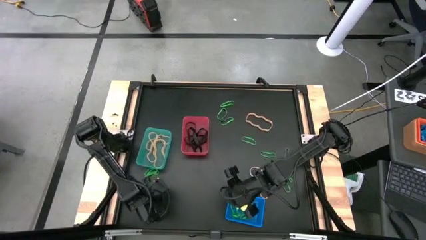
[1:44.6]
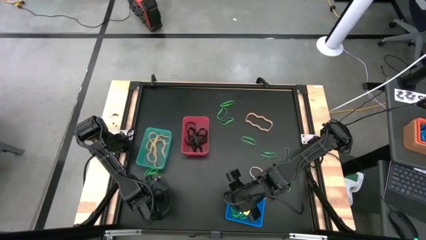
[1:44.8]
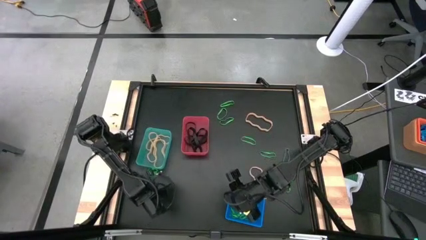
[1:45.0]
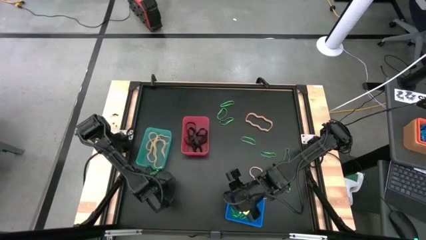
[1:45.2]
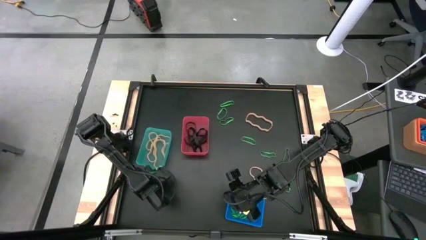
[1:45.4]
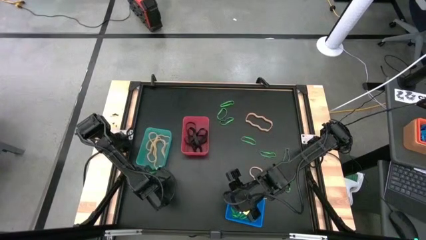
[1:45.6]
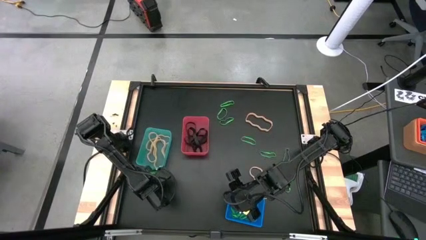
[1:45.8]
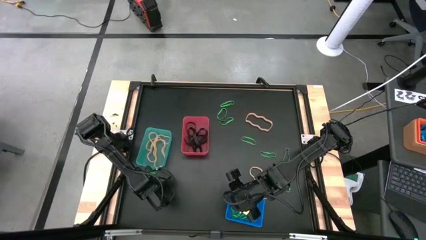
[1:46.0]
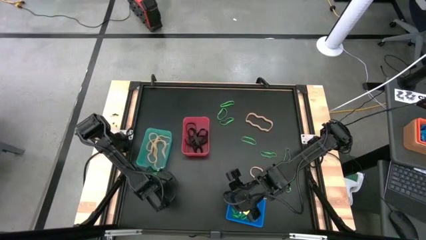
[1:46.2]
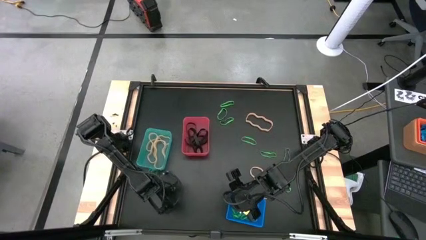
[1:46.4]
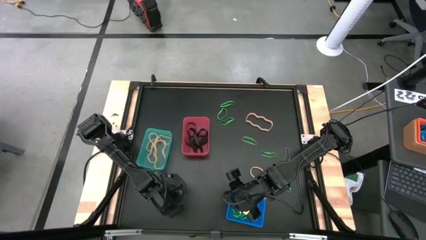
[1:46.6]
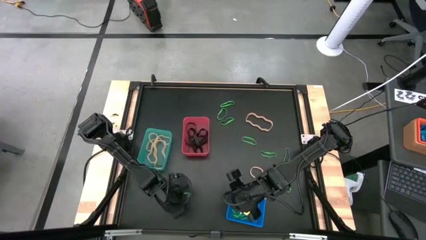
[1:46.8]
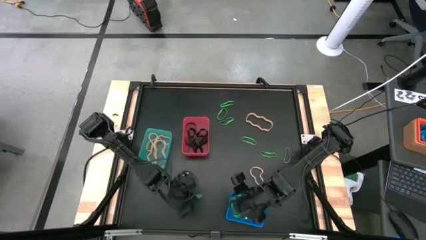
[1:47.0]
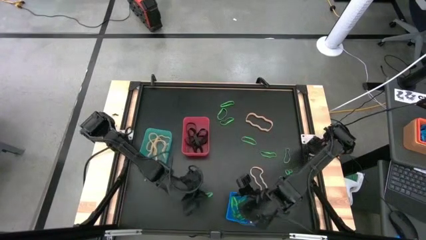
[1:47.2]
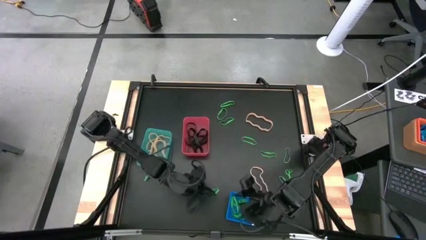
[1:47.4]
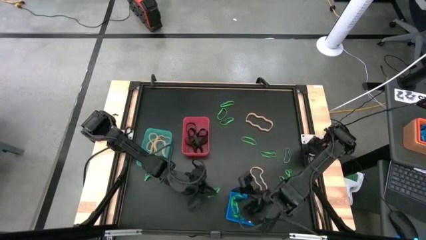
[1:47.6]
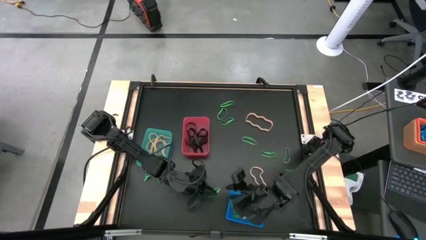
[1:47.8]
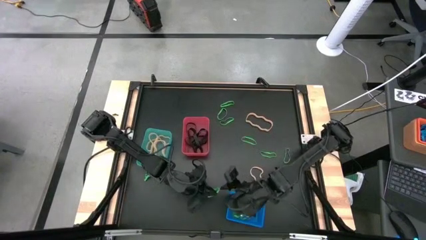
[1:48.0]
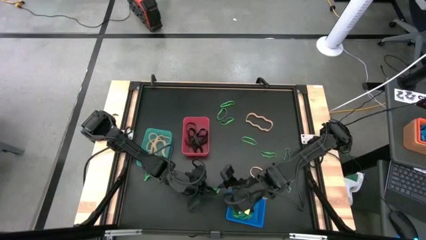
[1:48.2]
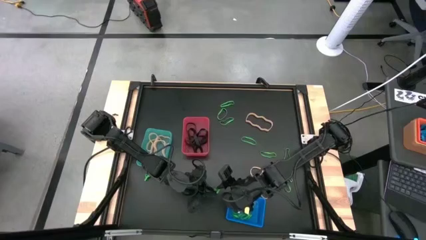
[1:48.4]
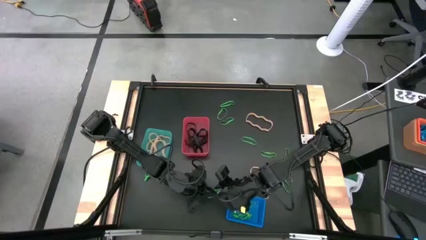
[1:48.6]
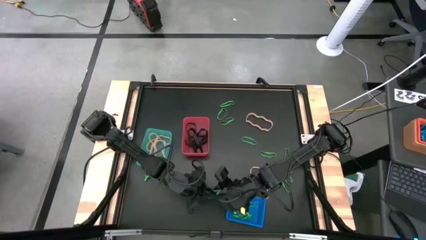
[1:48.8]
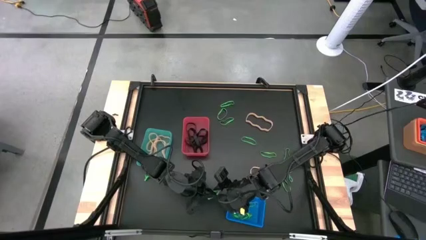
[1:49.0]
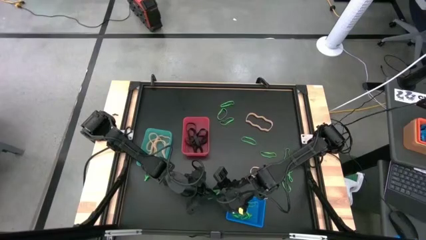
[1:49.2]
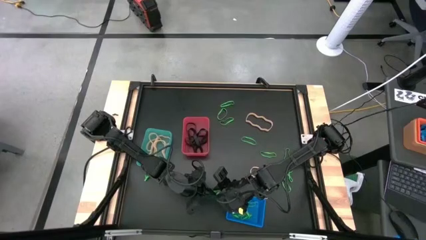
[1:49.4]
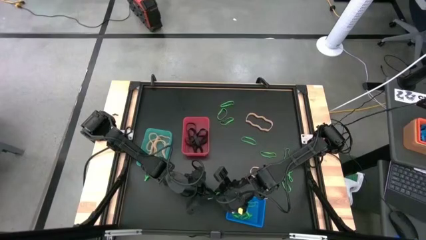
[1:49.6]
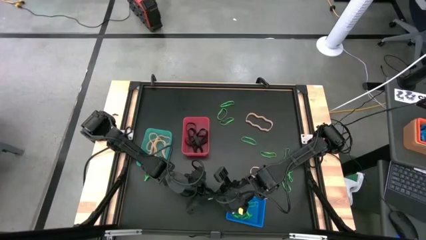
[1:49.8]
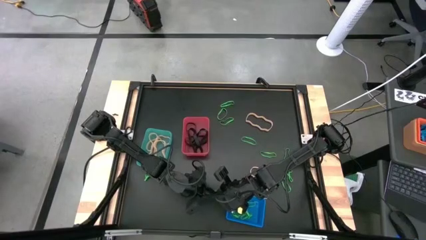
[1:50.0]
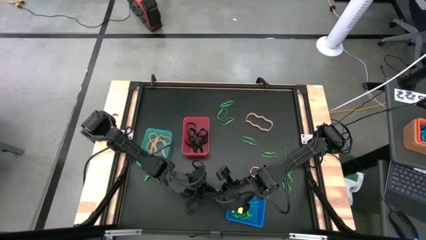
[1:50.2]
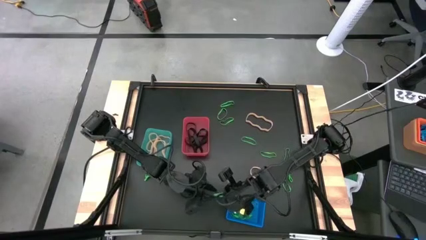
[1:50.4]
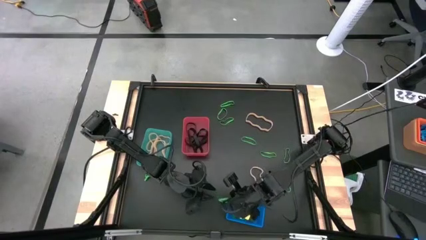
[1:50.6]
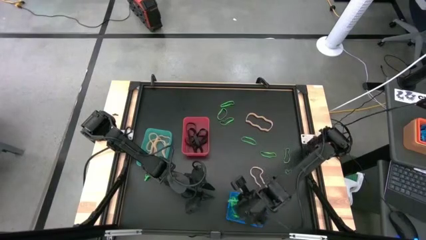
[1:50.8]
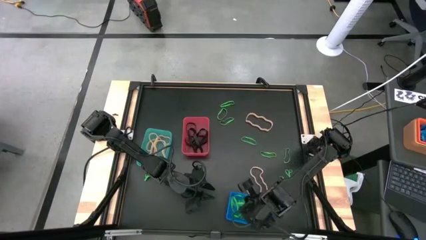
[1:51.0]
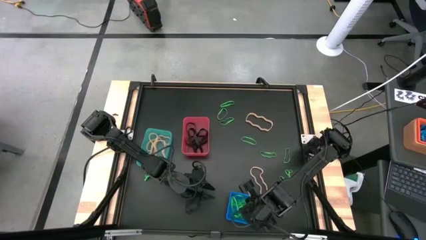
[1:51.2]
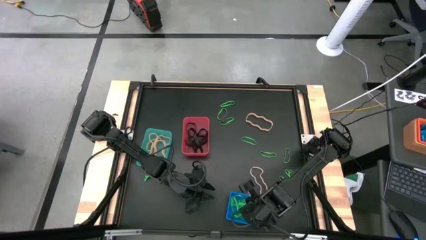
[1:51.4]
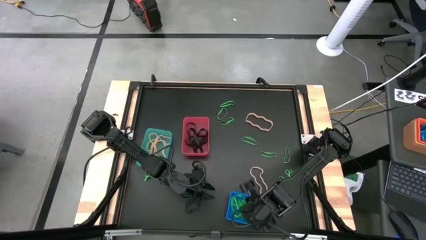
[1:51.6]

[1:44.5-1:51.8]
Task: Sort rubber bands into baskets
Put the green rubber band into the blue bin

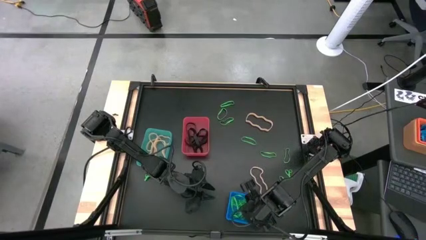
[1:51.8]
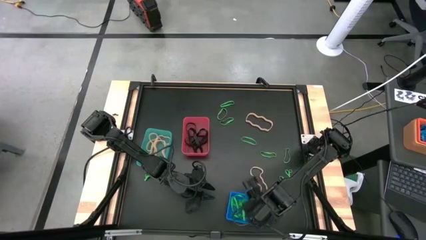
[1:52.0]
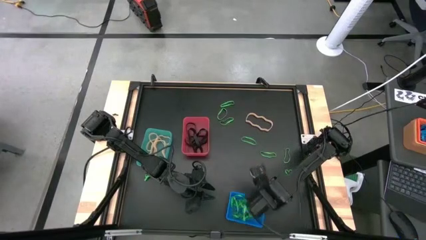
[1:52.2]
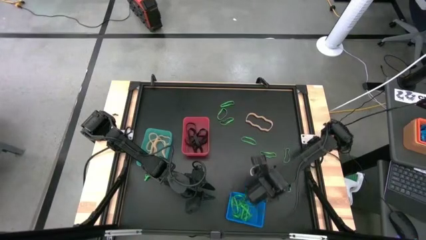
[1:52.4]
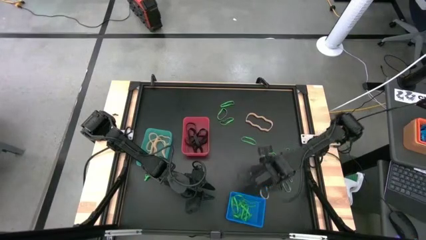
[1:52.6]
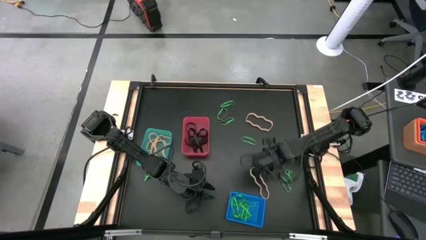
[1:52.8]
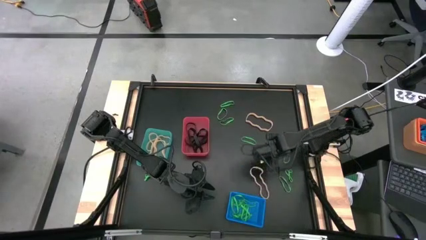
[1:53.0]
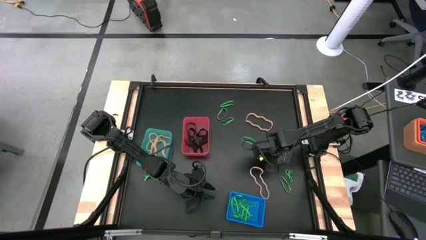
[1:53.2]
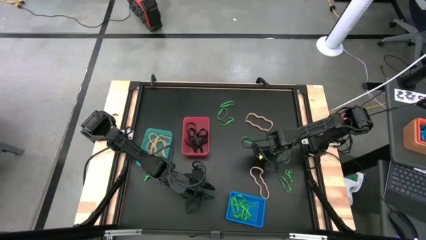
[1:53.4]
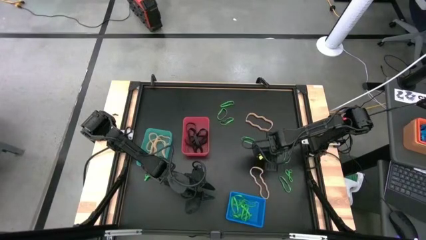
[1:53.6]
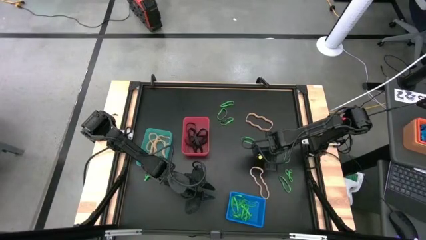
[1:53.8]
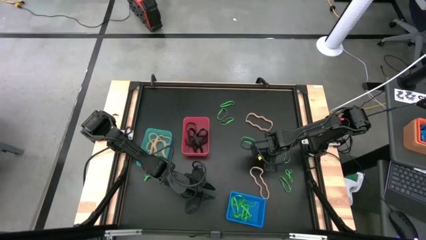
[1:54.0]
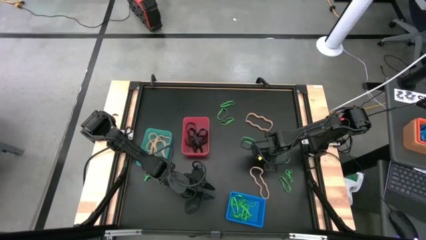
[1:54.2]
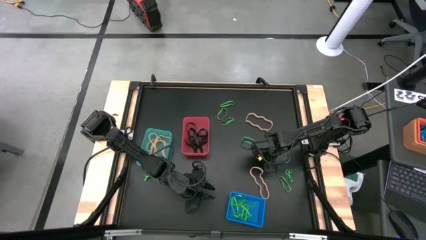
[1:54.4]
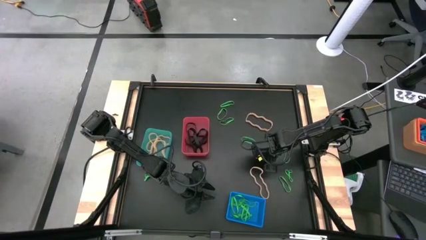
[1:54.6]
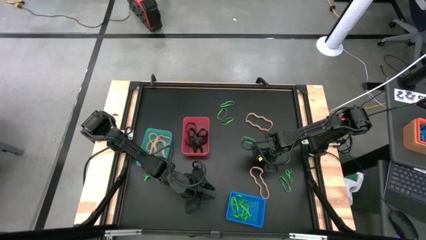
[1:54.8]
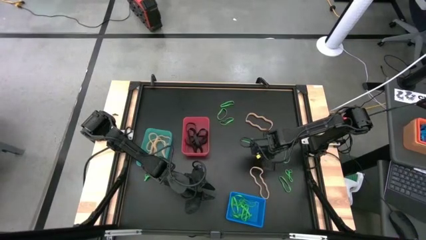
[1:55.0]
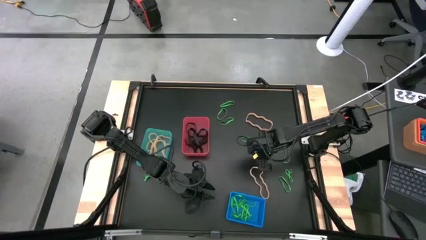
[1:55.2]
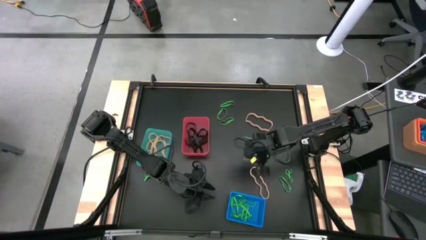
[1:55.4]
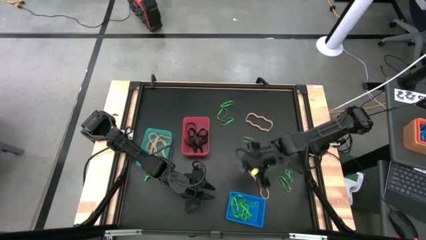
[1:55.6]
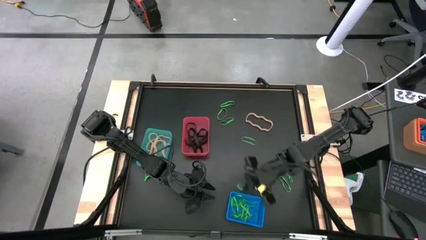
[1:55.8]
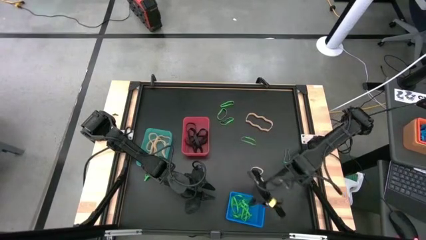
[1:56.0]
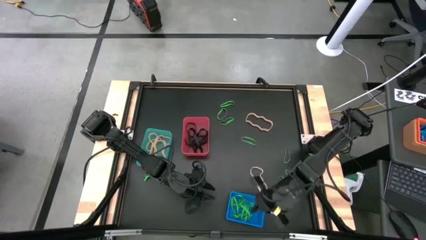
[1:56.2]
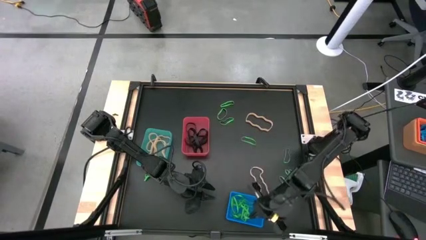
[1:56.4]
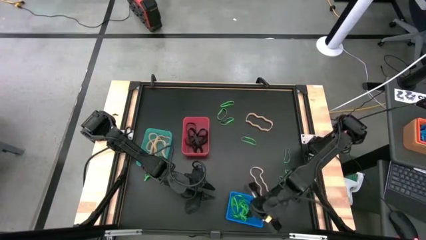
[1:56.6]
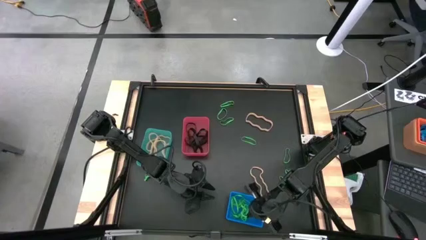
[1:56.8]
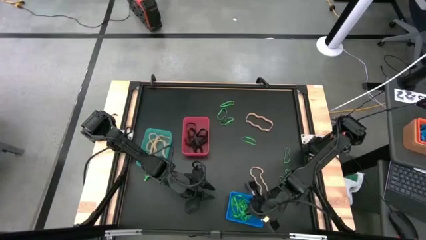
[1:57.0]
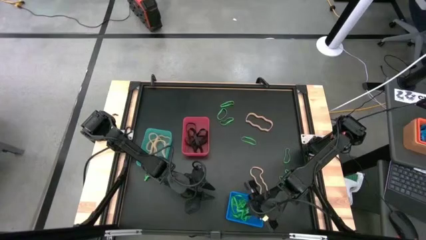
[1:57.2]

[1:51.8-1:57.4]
Put the green rubber band into the blue bin

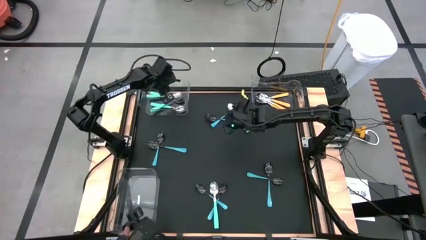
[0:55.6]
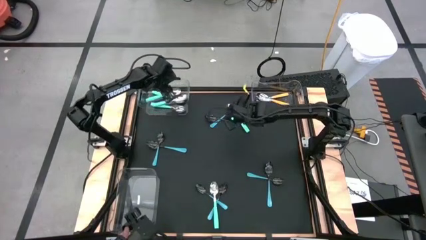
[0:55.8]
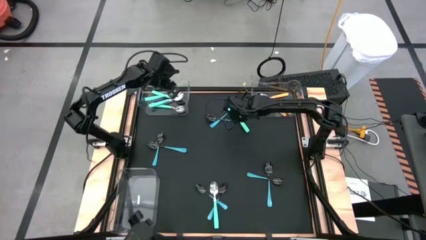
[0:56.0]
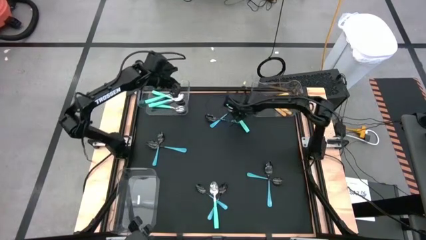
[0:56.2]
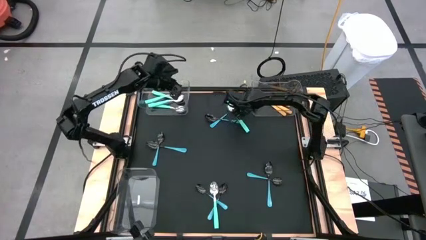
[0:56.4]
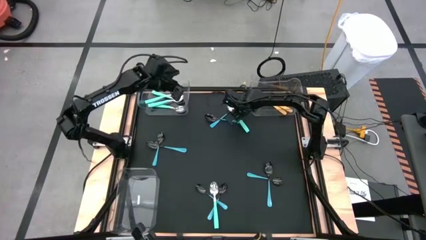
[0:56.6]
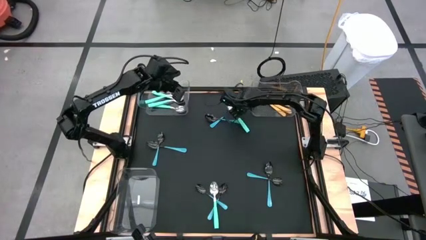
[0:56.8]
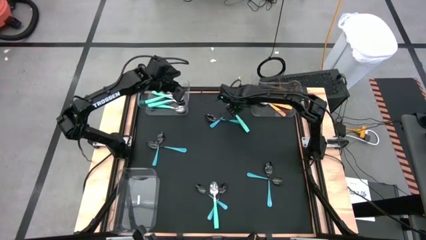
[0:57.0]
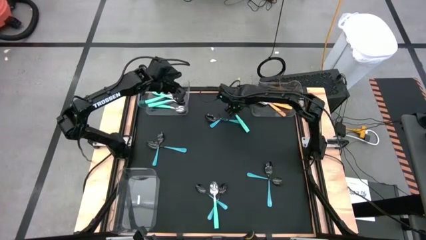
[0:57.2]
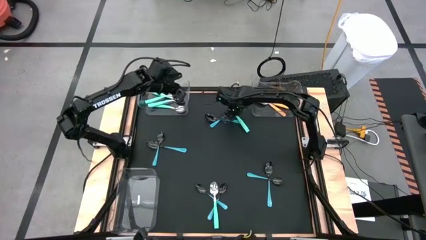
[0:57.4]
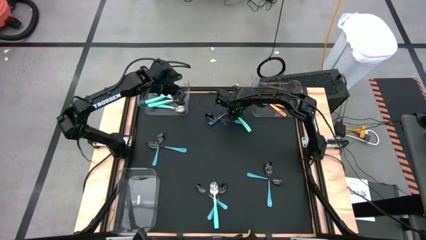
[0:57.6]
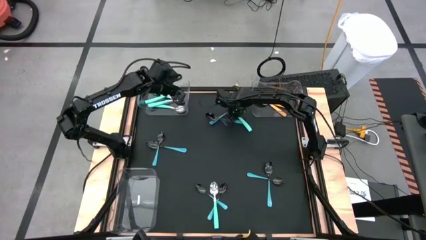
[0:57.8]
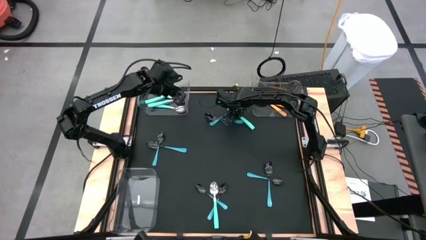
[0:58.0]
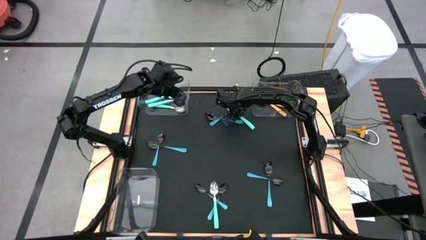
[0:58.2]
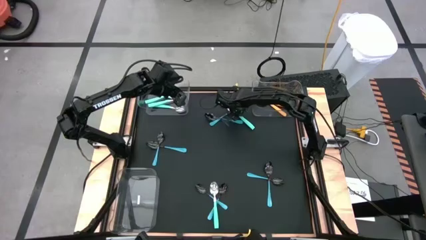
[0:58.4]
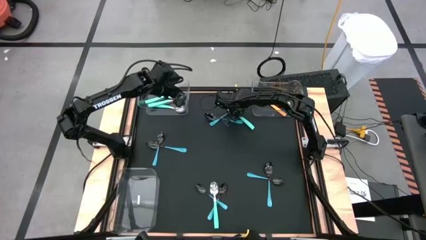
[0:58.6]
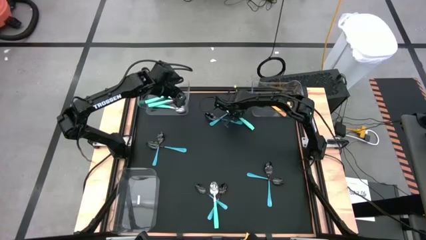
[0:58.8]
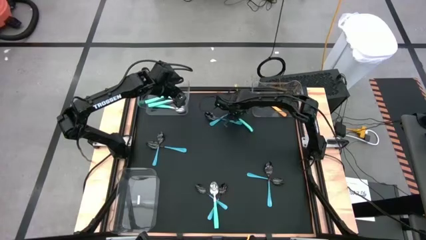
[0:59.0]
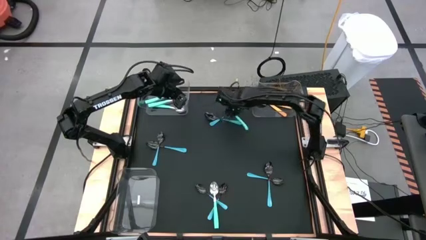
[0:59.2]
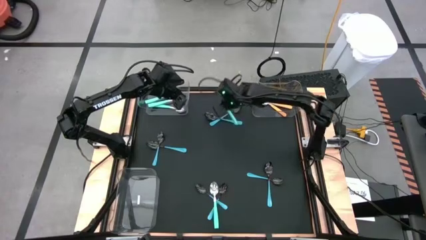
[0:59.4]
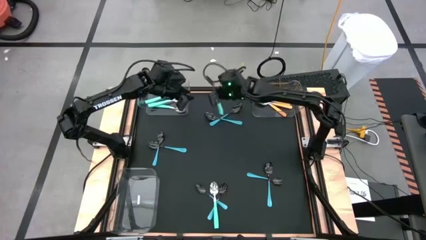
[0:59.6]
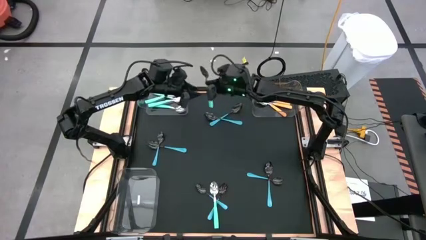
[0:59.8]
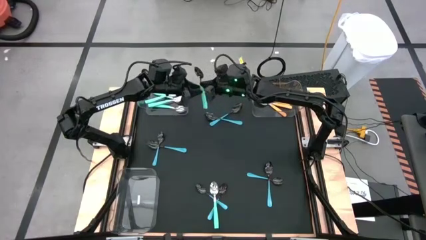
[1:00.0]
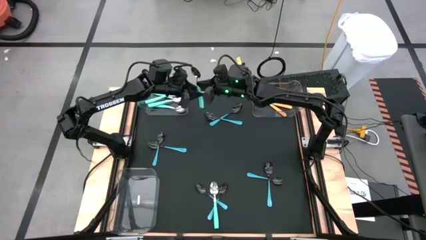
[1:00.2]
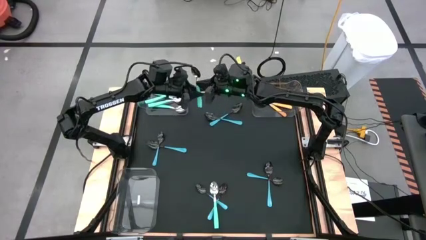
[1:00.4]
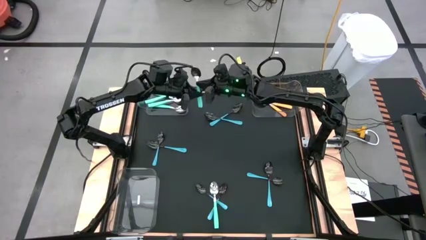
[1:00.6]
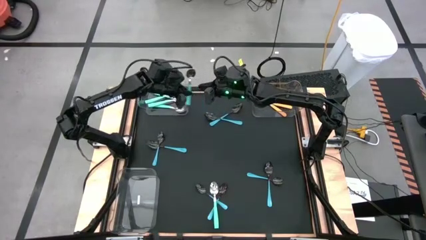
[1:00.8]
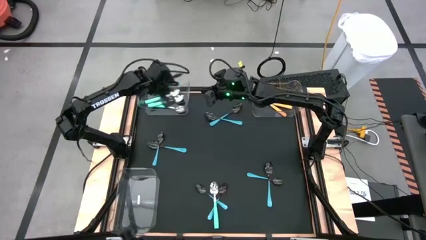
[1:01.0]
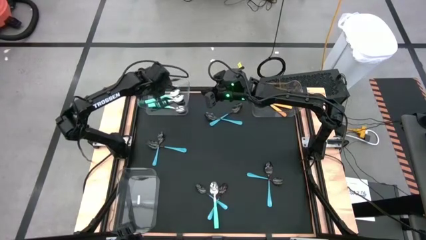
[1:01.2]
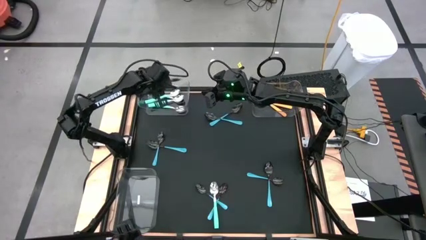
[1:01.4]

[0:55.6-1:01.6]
Task: Sort silverware by color (type)
Put the light blue spoon into the top left transparent bin
